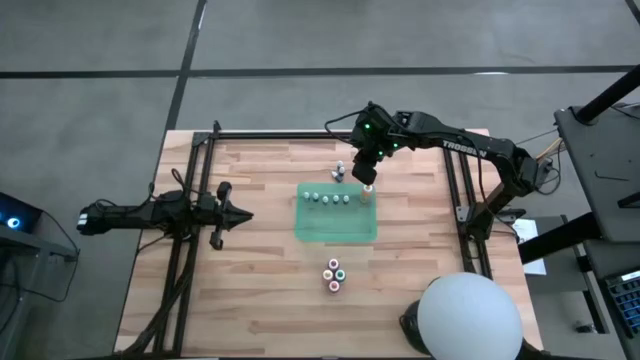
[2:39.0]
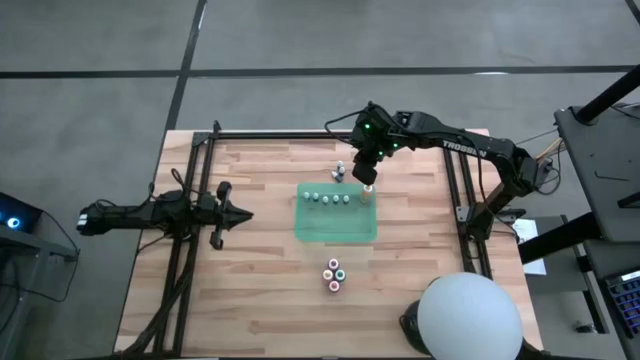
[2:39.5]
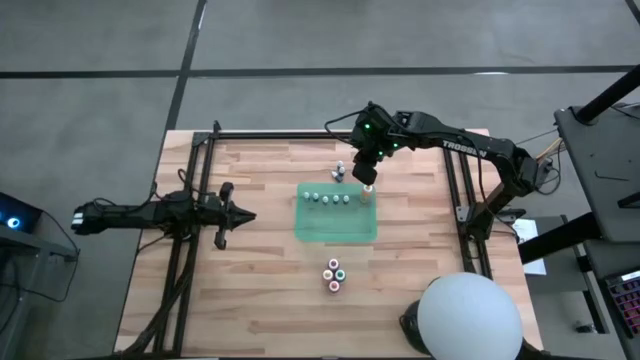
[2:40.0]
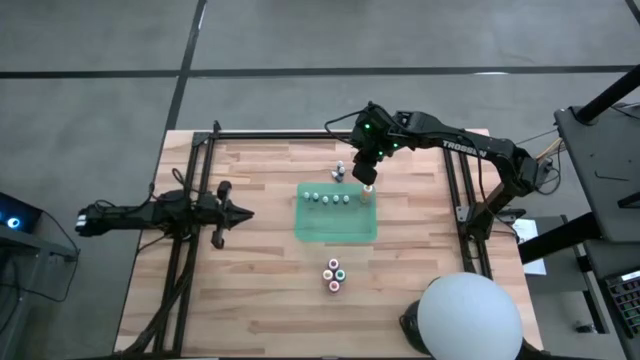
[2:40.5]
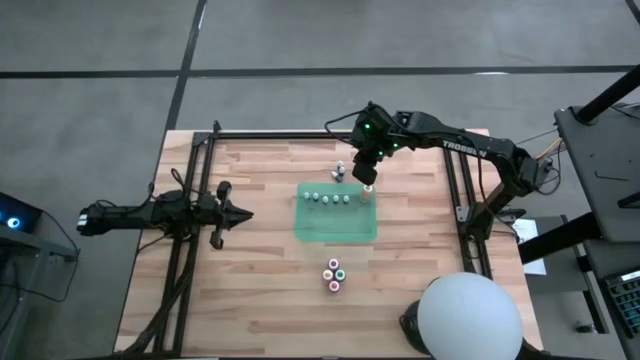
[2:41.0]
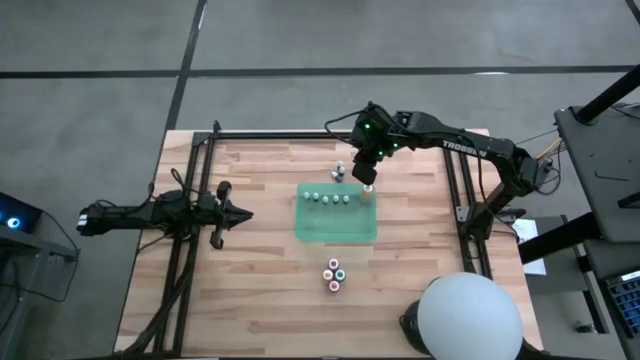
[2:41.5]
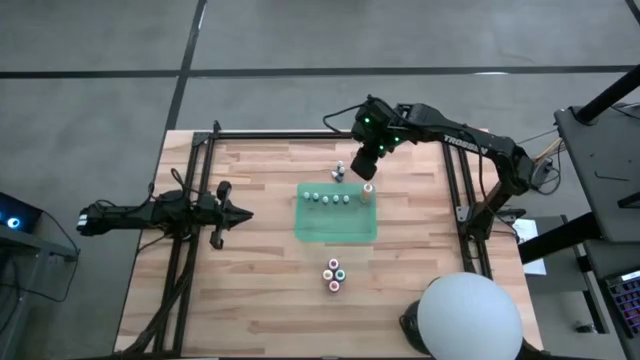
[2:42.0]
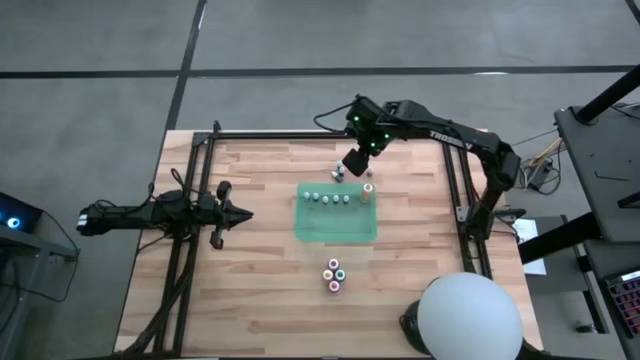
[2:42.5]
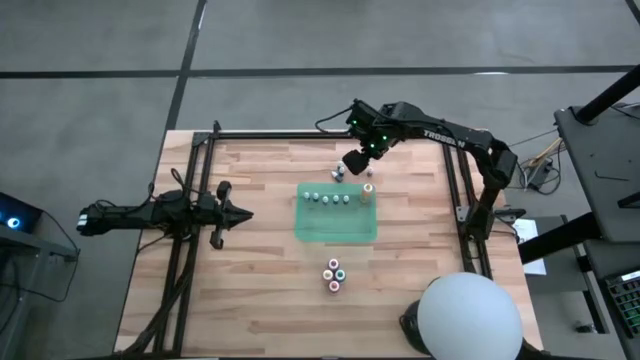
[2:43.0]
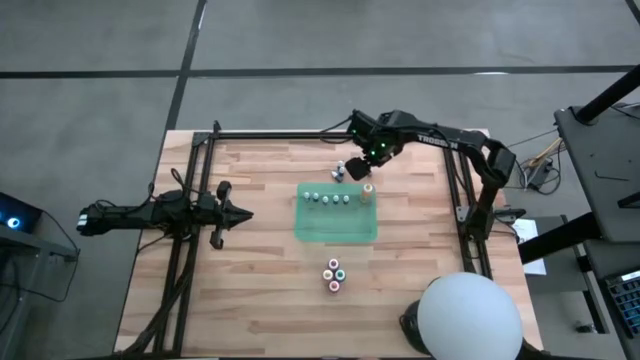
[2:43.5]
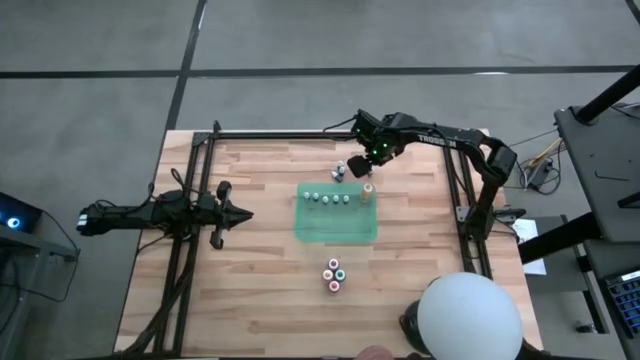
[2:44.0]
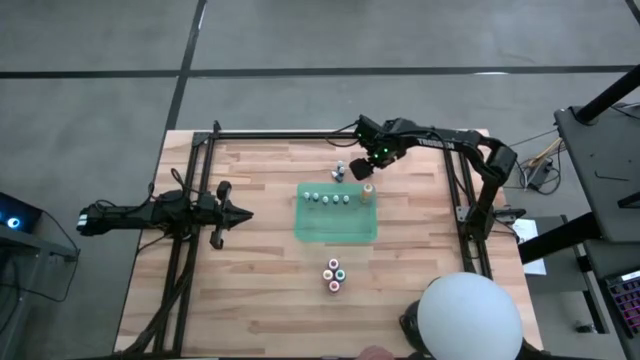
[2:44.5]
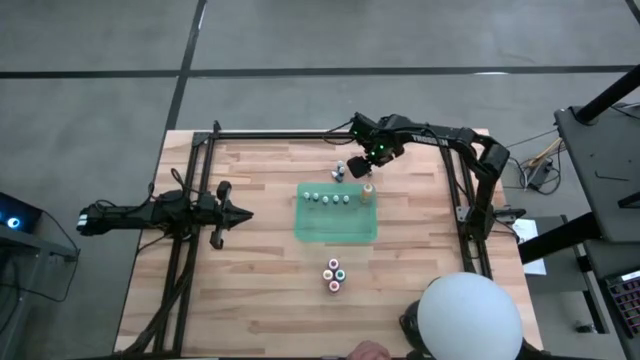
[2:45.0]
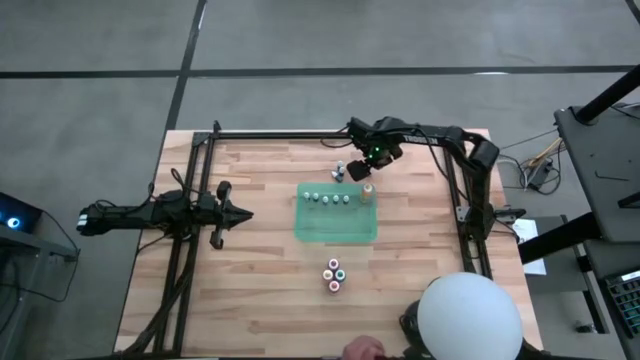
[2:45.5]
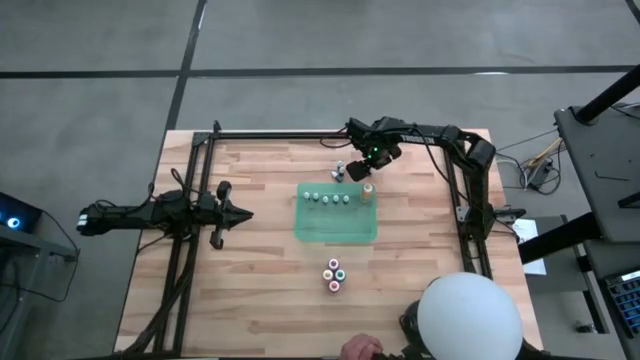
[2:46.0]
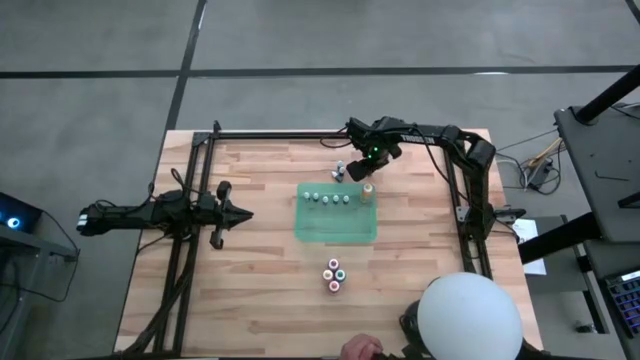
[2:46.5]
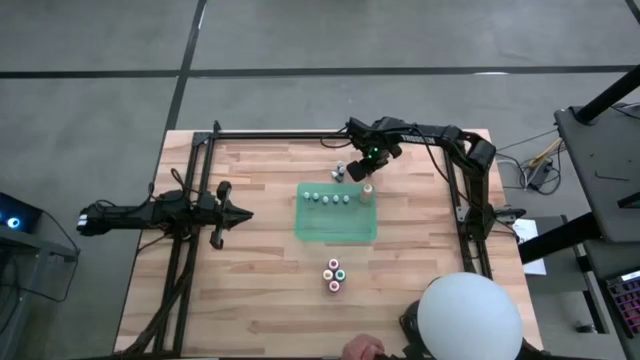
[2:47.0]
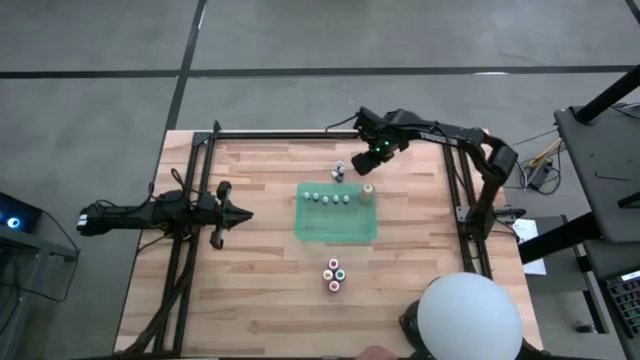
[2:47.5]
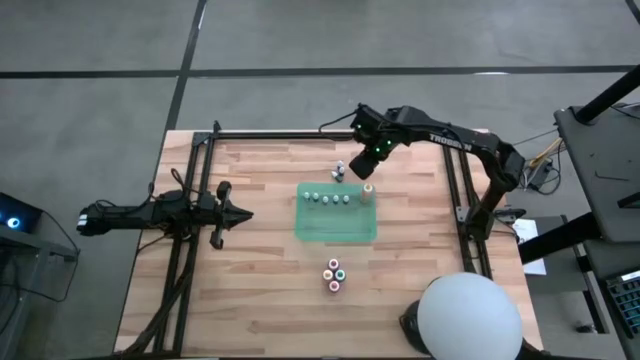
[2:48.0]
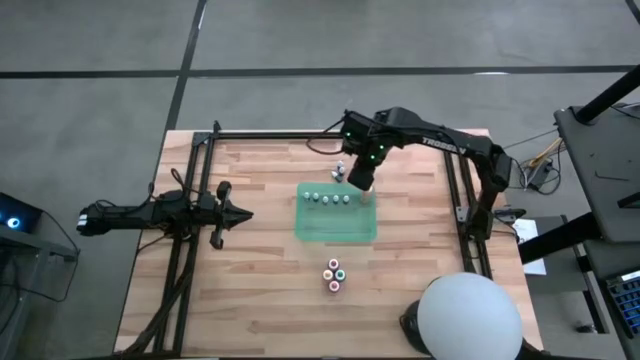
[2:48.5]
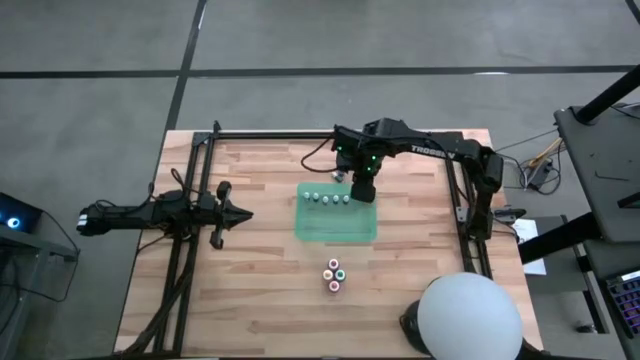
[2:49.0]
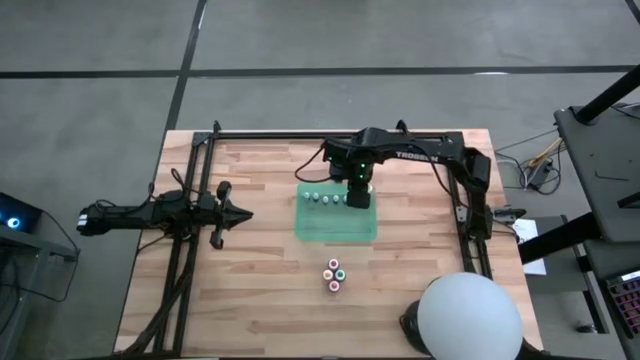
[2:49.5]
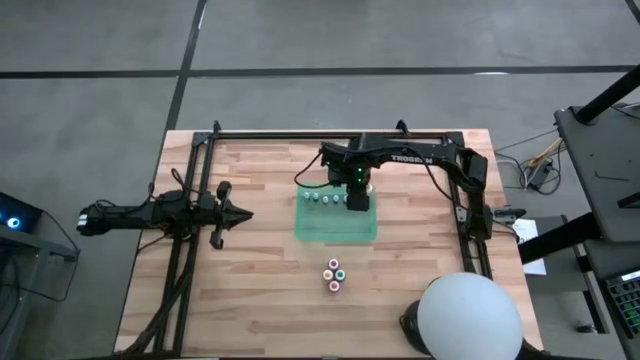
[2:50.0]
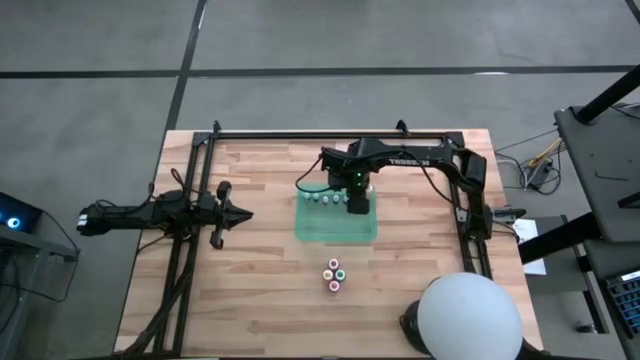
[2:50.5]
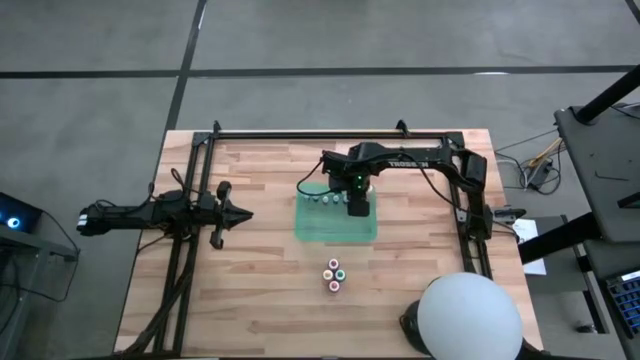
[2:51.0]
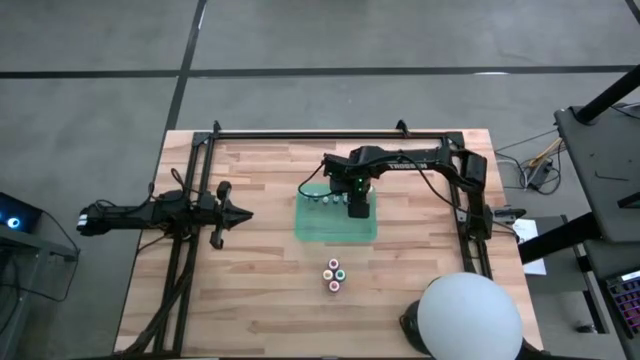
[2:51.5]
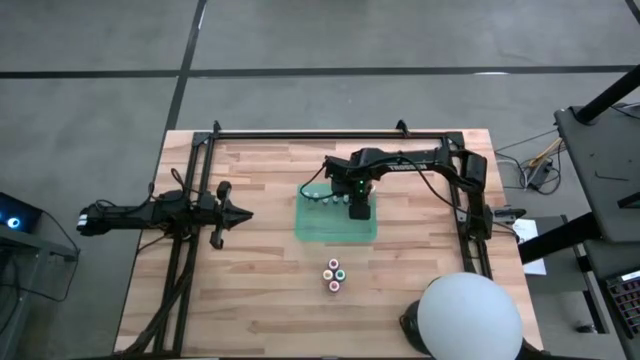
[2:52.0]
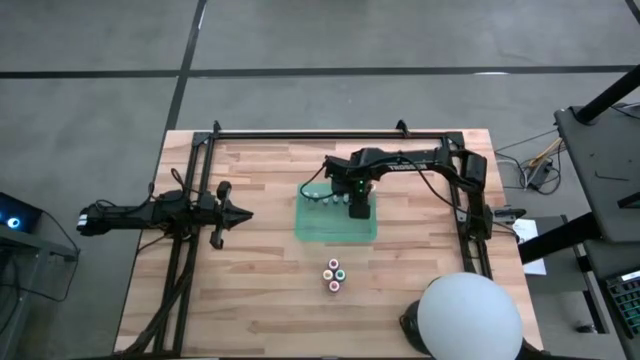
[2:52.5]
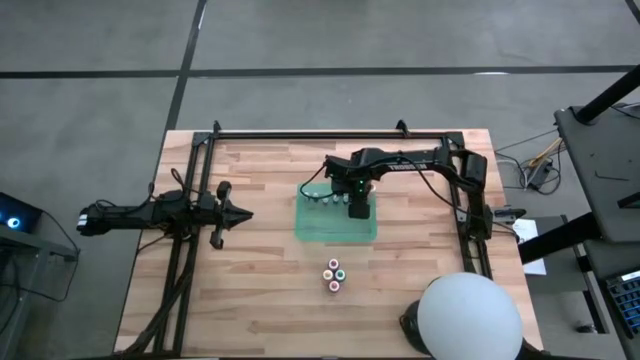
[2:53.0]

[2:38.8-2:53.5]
Task: Pick & Place food coloring
Put the small black food coloring bottle into the green container

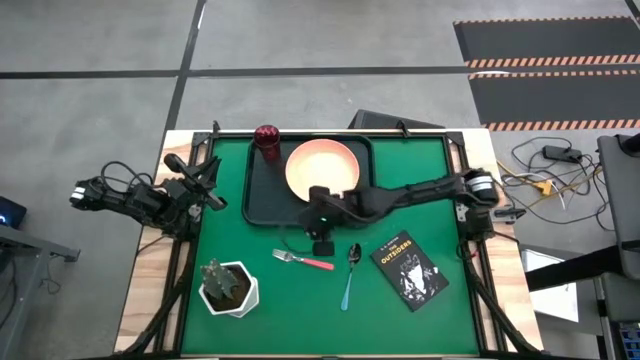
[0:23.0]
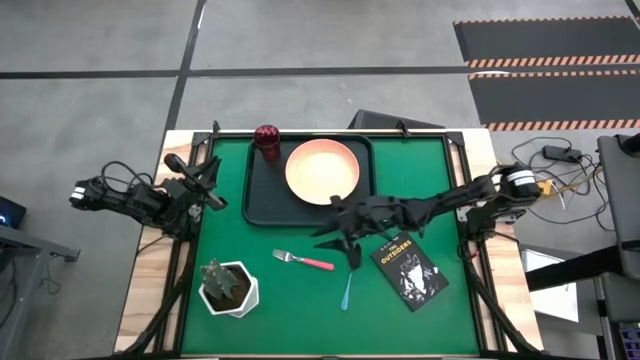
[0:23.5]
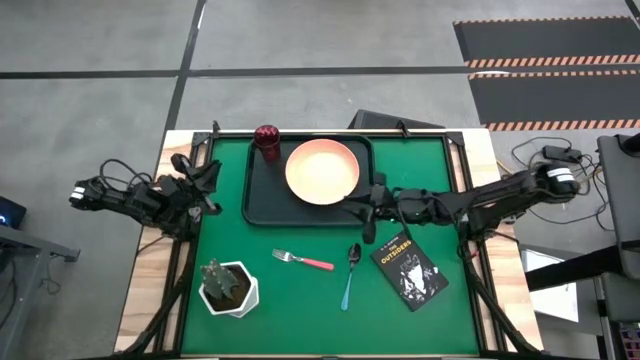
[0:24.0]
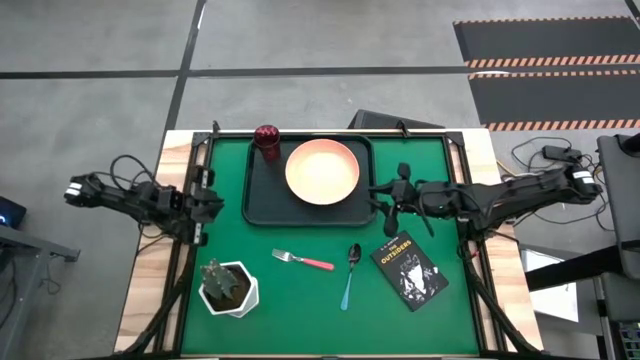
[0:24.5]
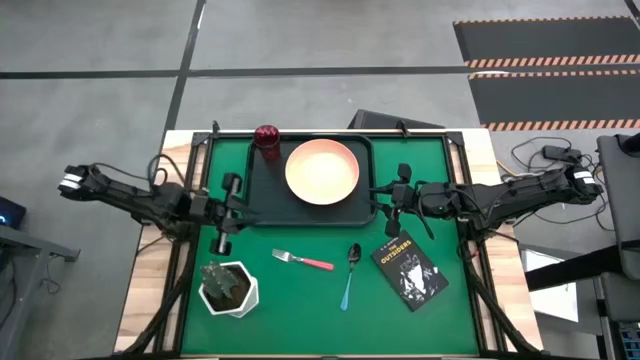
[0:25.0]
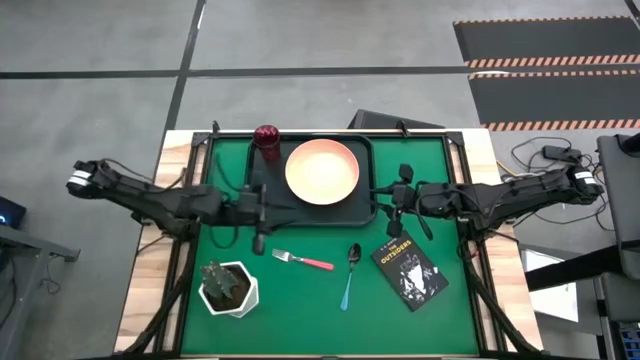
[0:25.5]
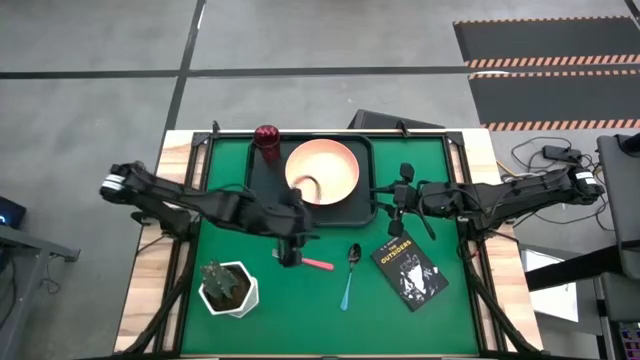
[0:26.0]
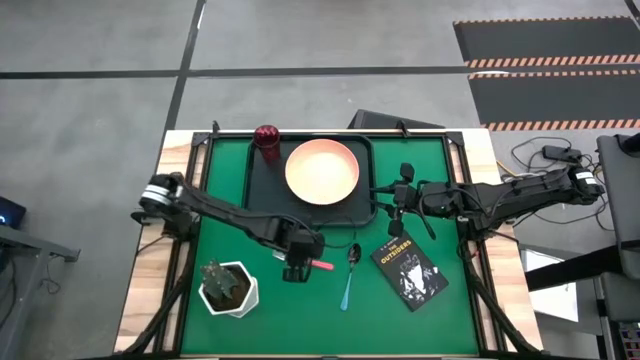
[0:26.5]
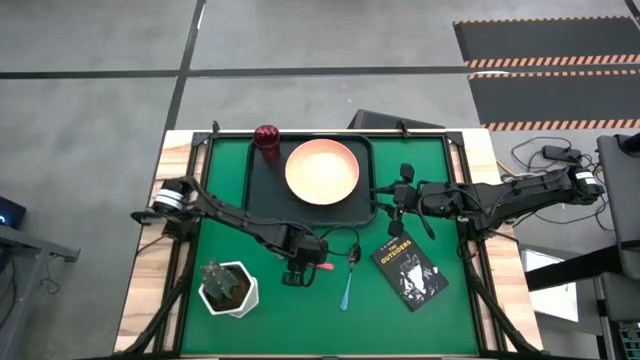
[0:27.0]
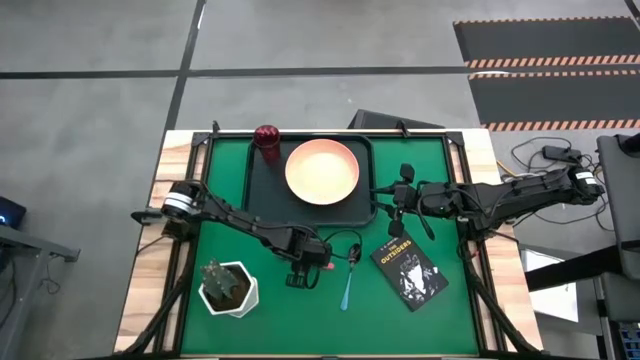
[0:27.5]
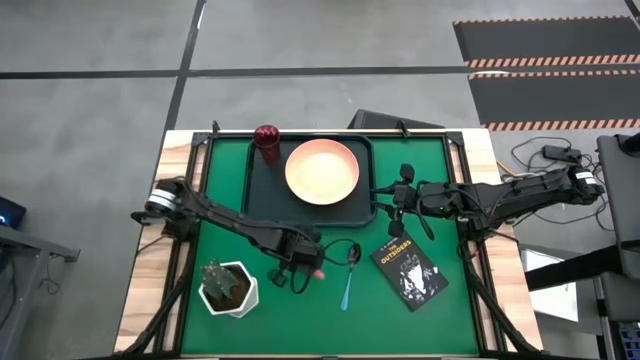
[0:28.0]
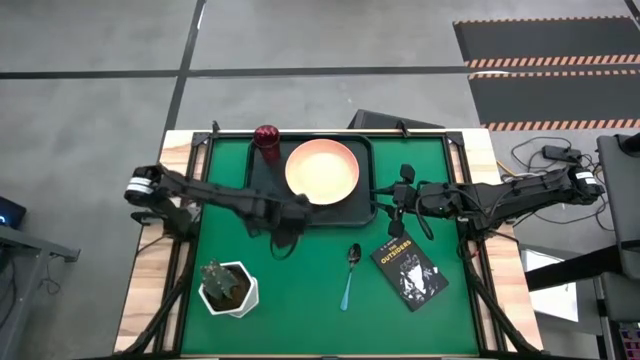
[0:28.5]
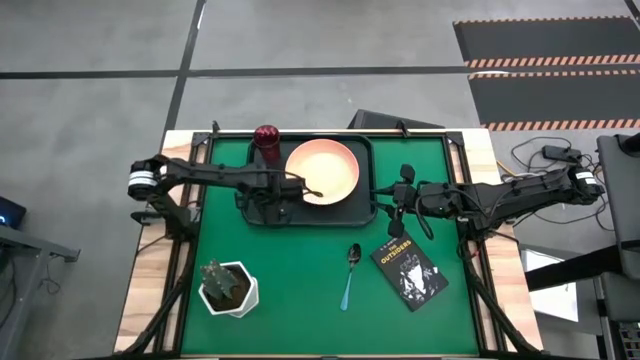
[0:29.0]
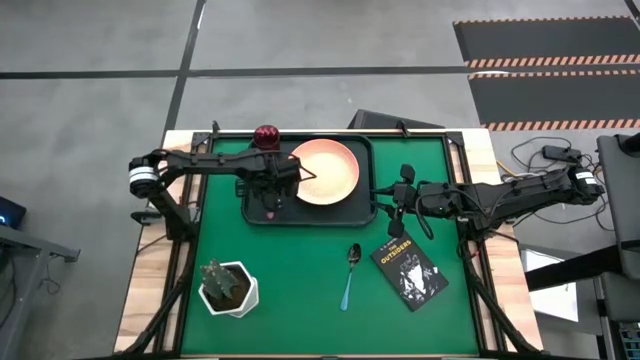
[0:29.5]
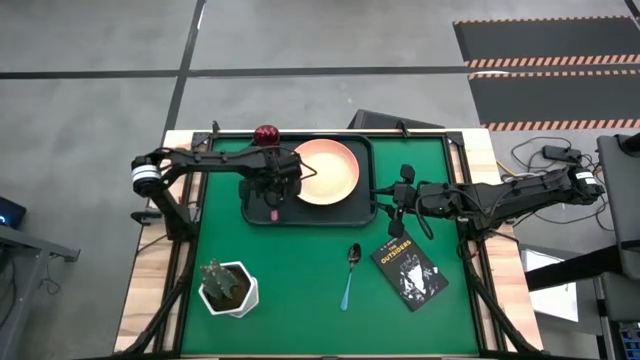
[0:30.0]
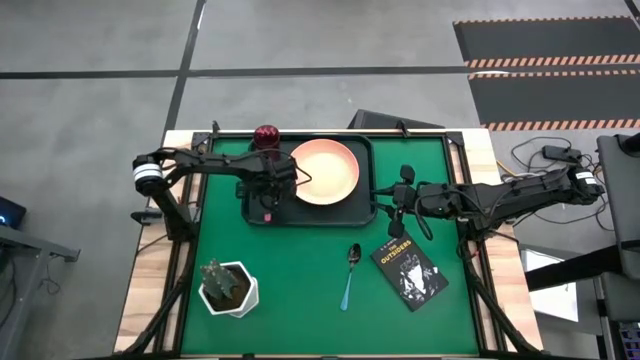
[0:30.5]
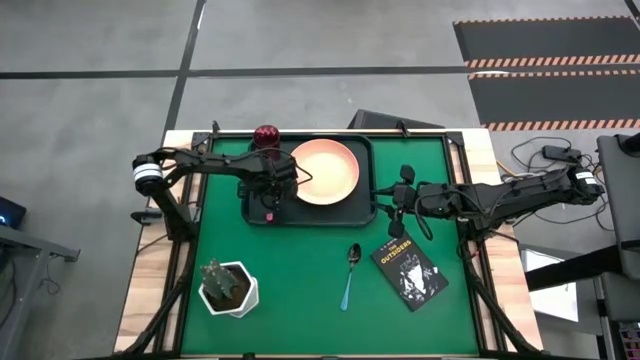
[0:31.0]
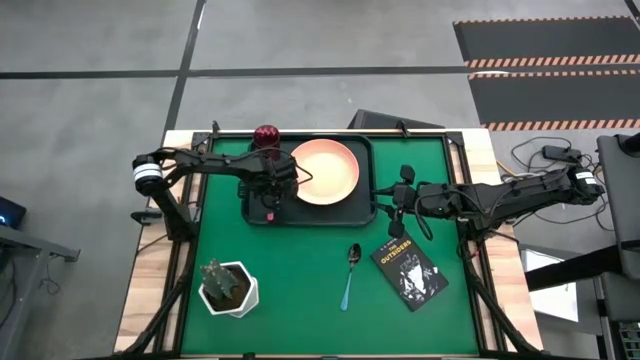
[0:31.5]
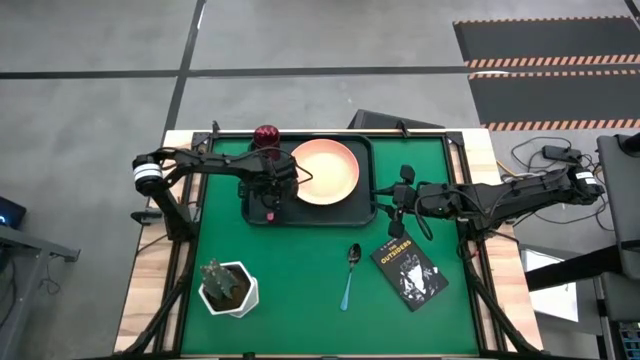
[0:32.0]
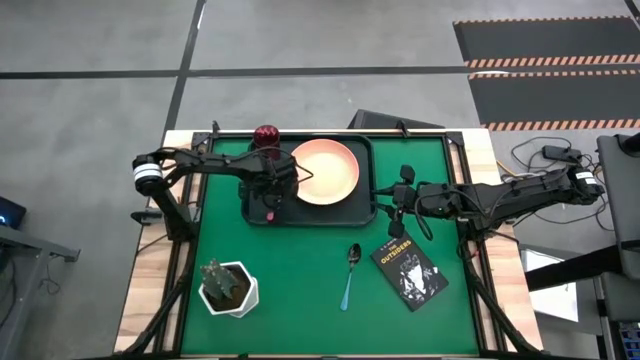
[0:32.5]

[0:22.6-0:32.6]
Task: Pick and place plate/cup/fork/spoon on tray
Put the pink fork on the black tray beside the light pink plate
